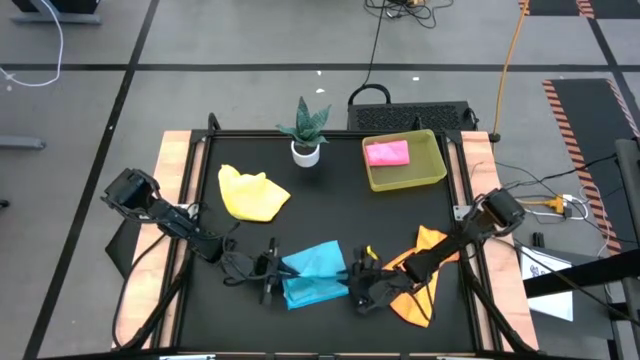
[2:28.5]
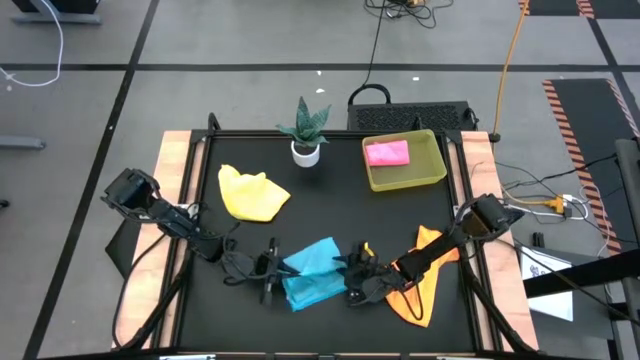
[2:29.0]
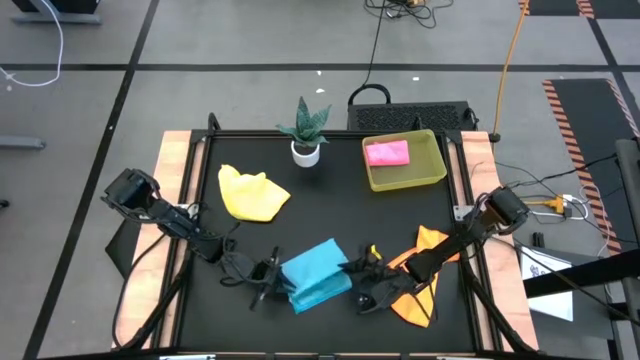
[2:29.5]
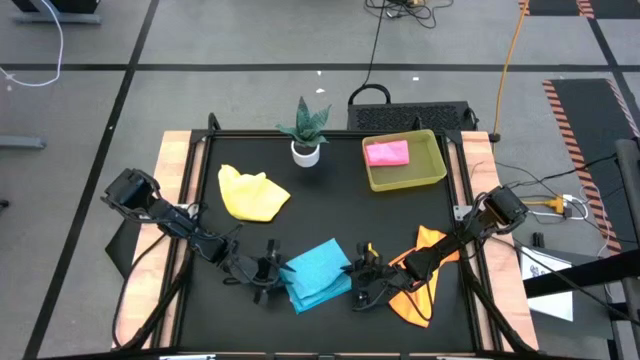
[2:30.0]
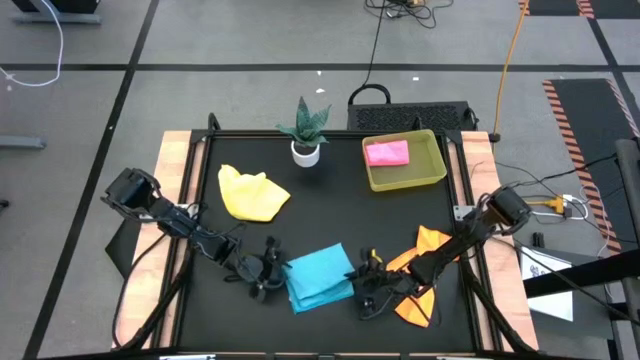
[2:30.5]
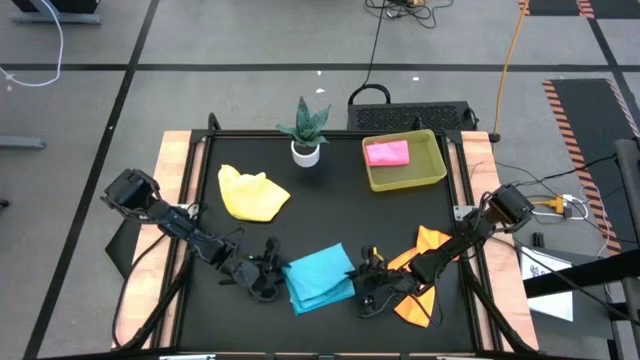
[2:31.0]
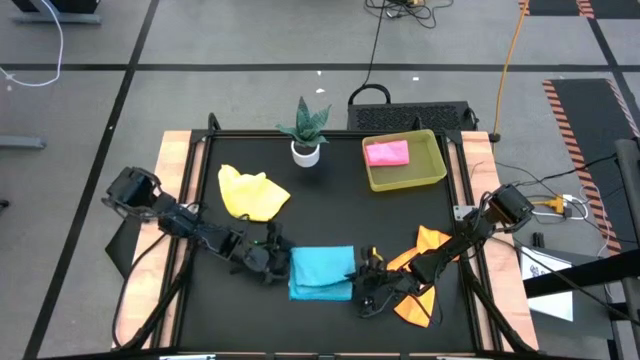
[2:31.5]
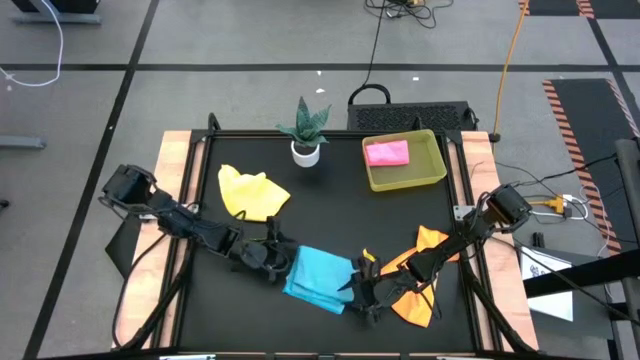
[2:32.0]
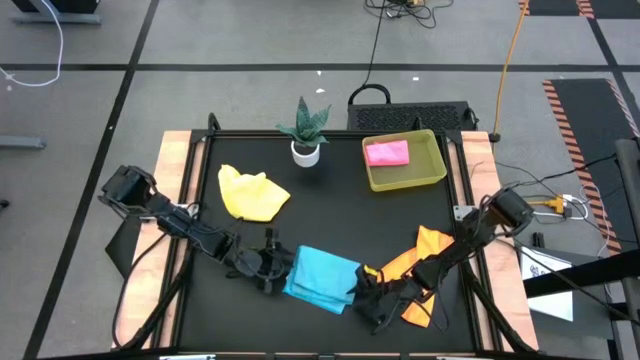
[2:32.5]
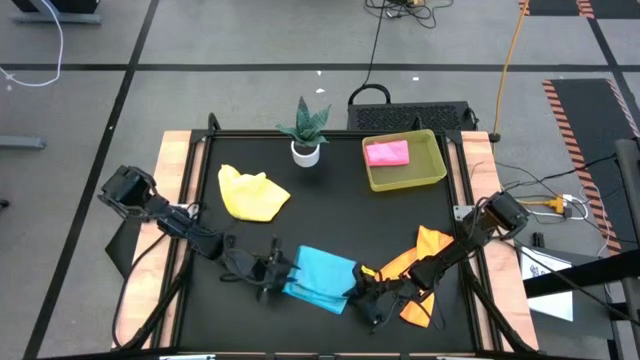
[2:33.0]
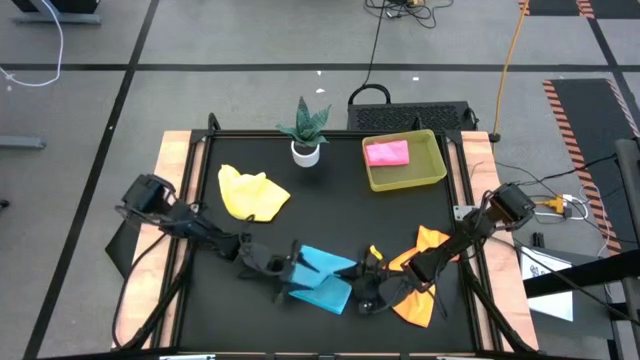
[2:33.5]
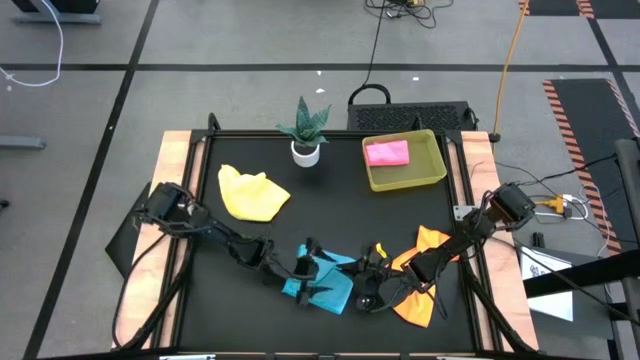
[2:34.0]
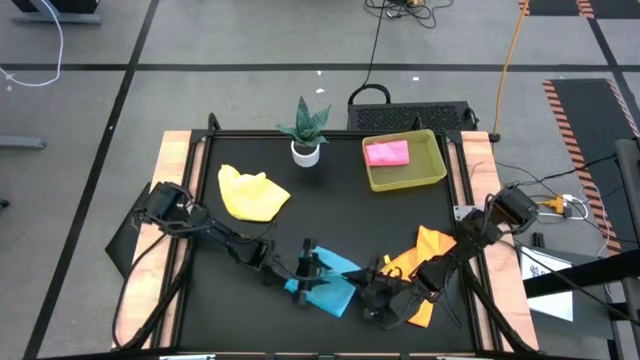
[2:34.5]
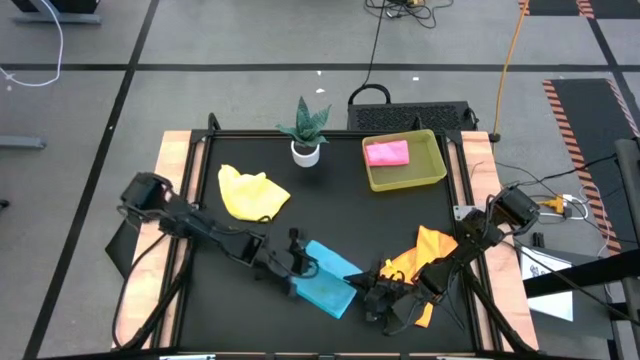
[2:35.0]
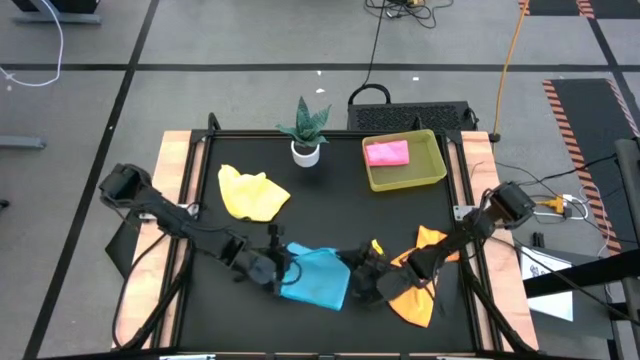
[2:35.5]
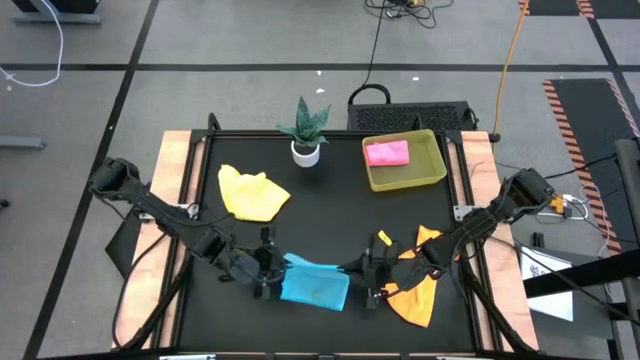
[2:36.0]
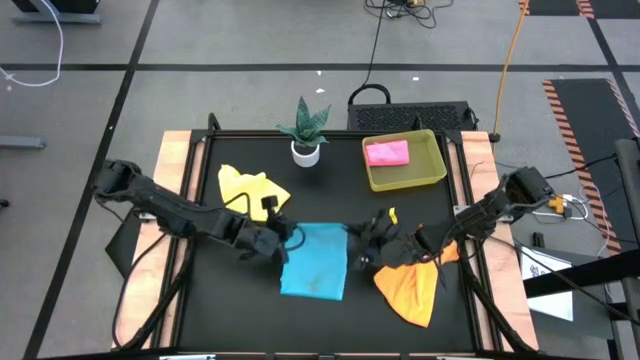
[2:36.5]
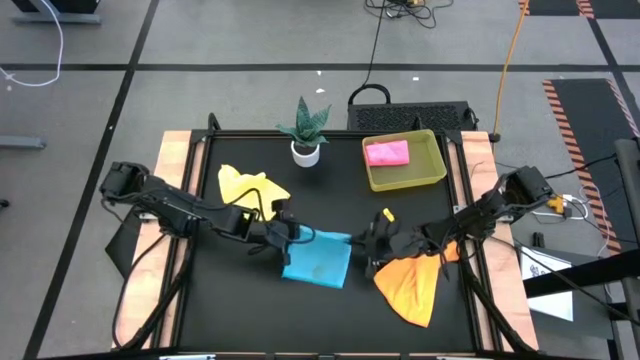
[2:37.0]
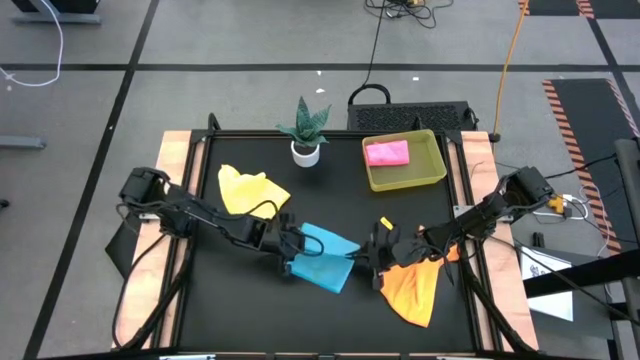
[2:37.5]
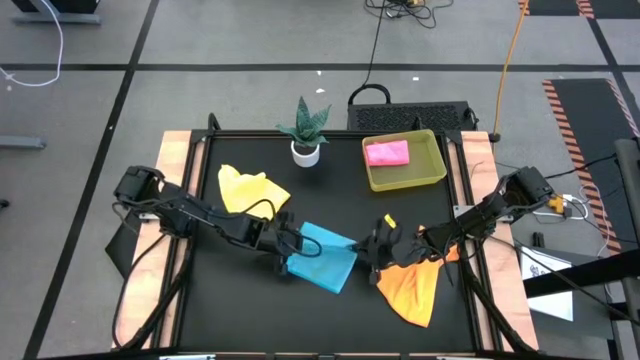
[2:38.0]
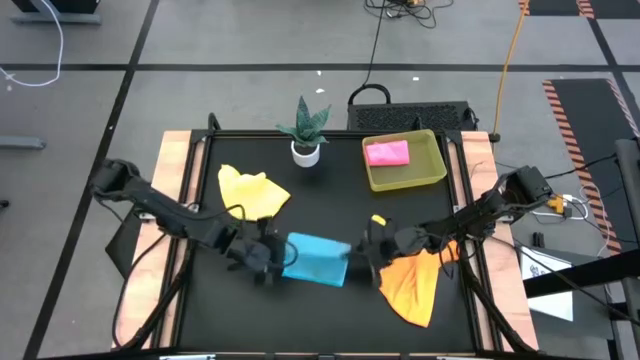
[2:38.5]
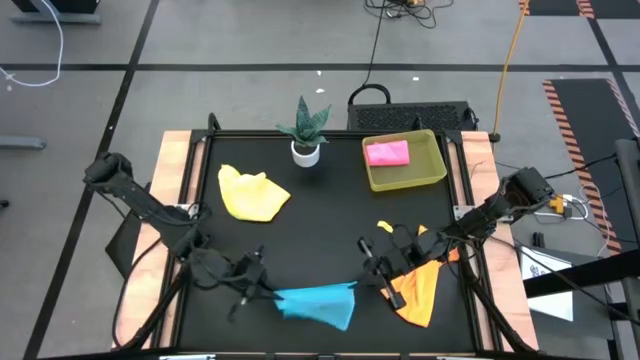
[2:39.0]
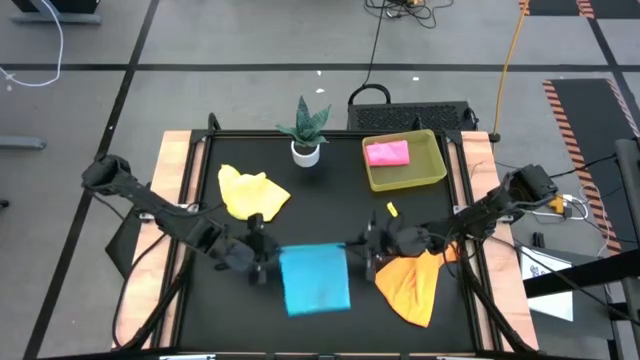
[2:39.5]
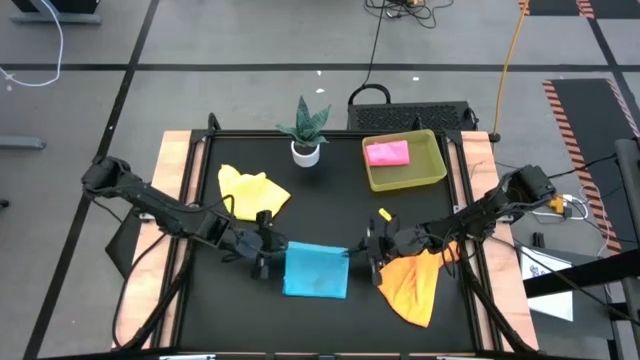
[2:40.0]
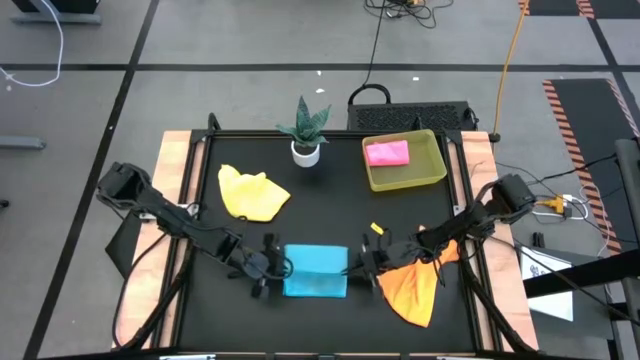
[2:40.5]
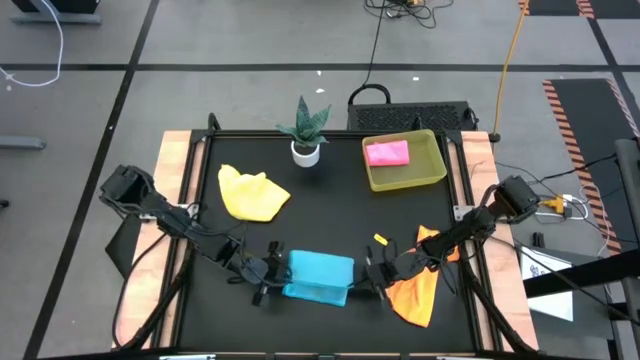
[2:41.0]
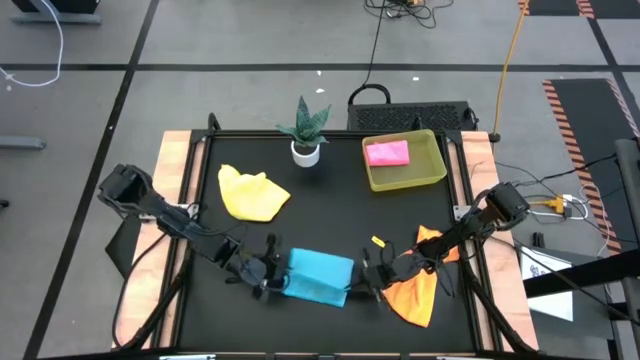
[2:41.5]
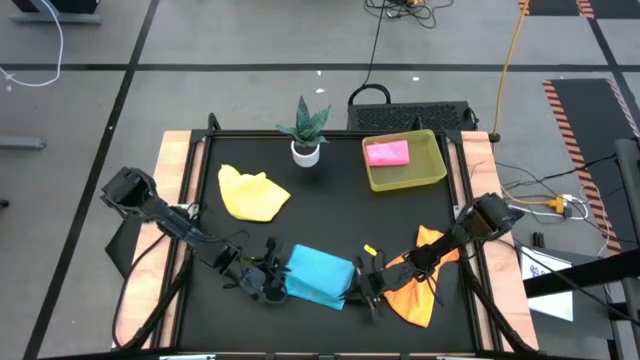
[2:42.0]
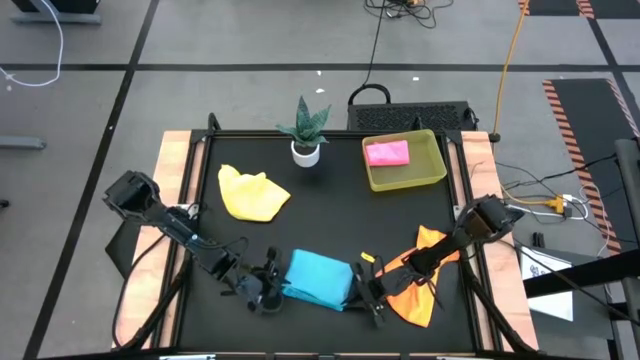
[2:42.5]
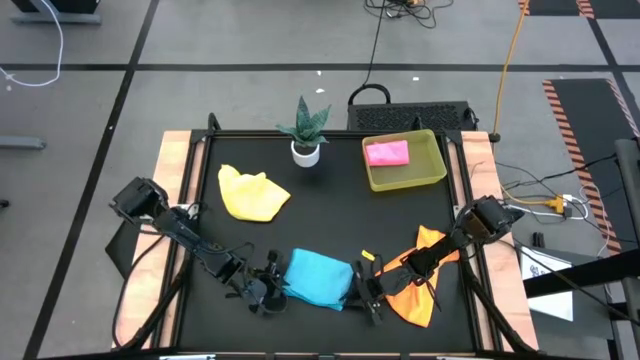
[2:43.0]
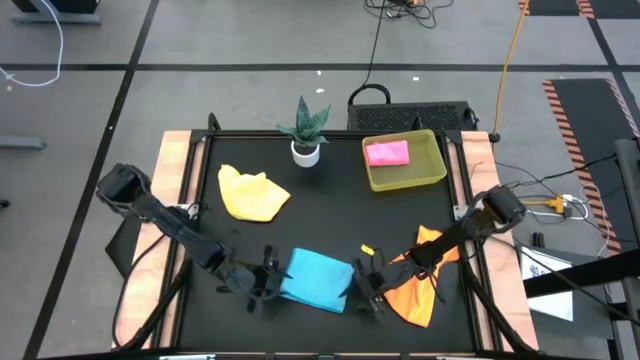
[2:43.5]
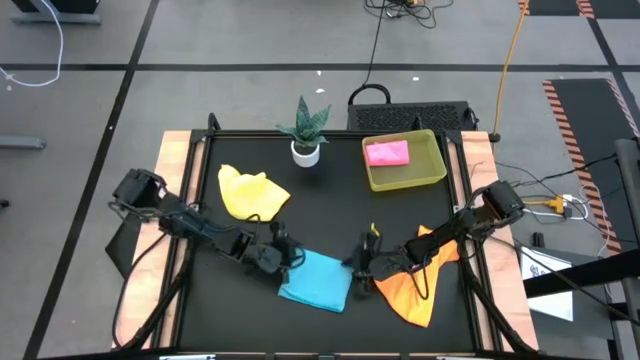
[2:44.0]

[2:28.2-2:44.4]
Task: Fold microfiber towels
Fold the blue microfiber cloth

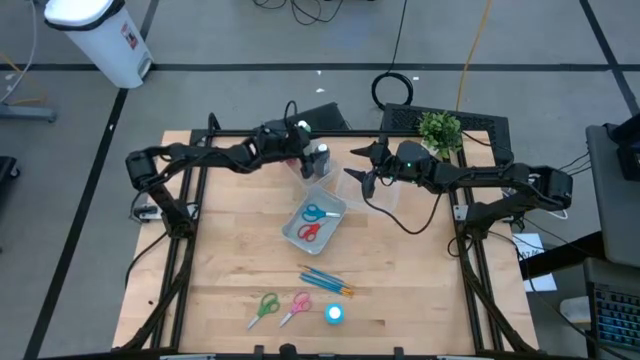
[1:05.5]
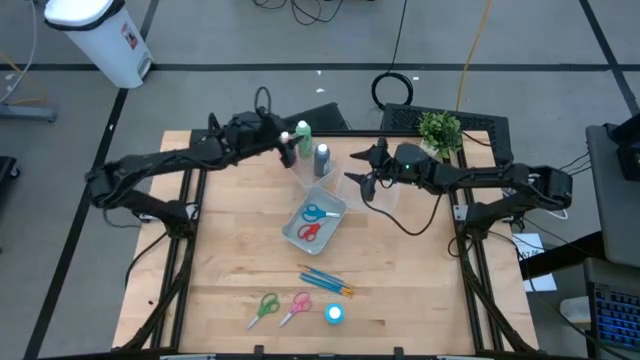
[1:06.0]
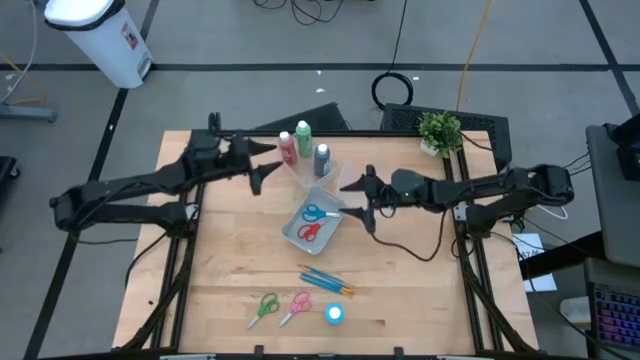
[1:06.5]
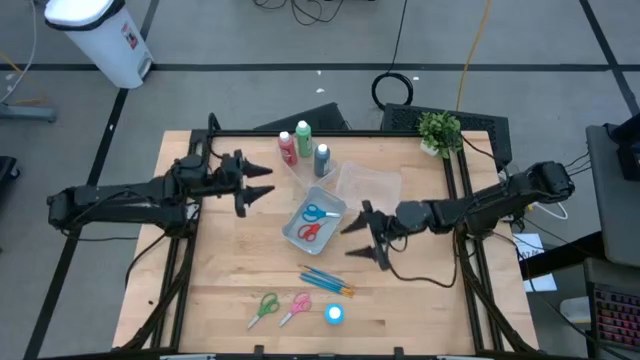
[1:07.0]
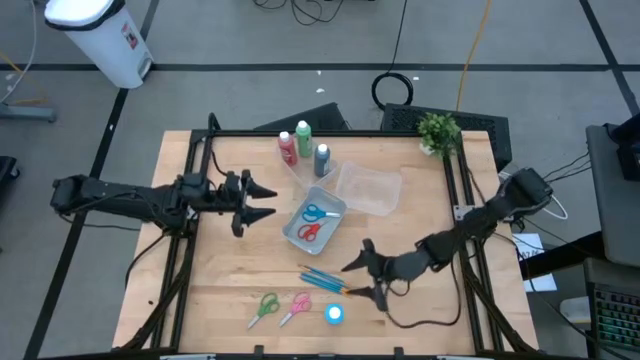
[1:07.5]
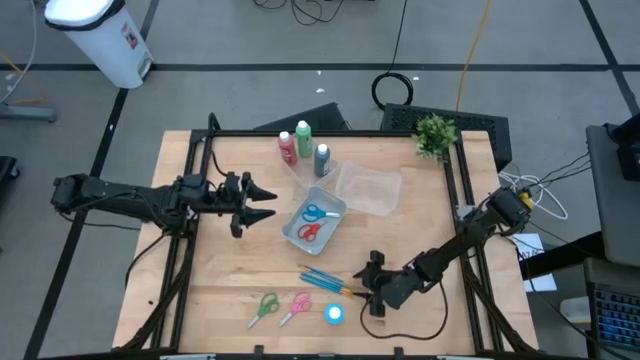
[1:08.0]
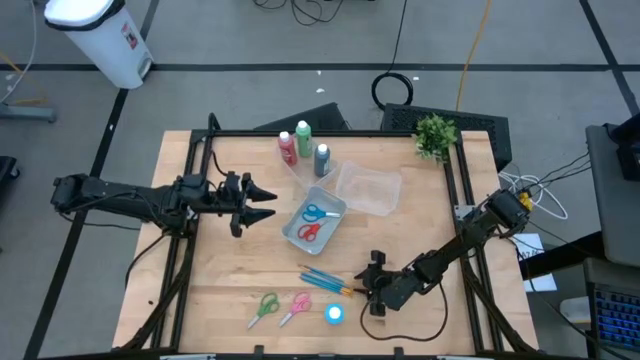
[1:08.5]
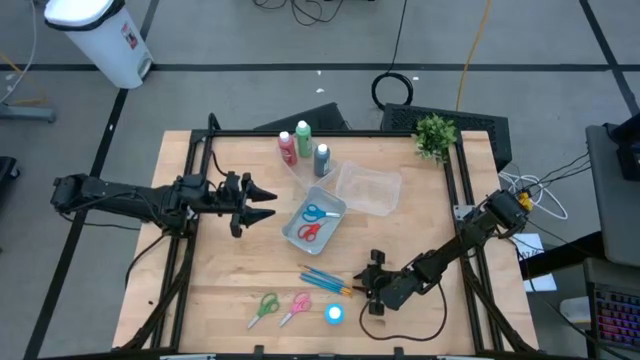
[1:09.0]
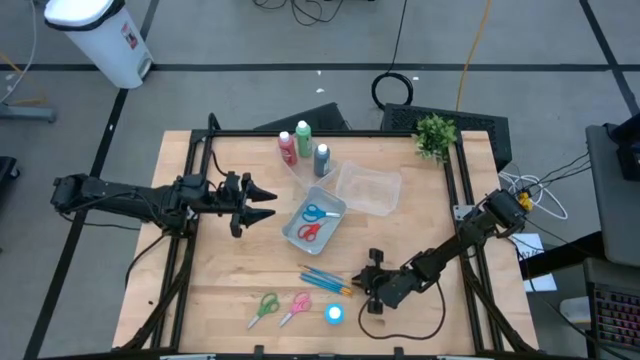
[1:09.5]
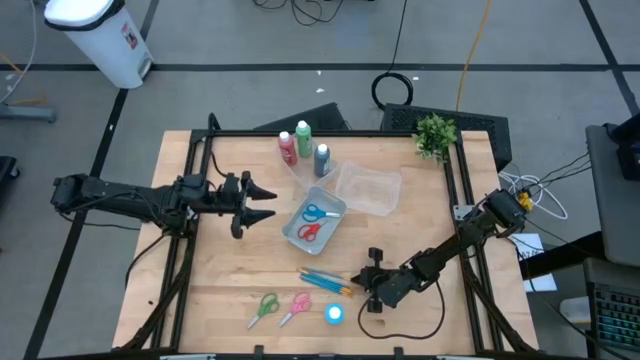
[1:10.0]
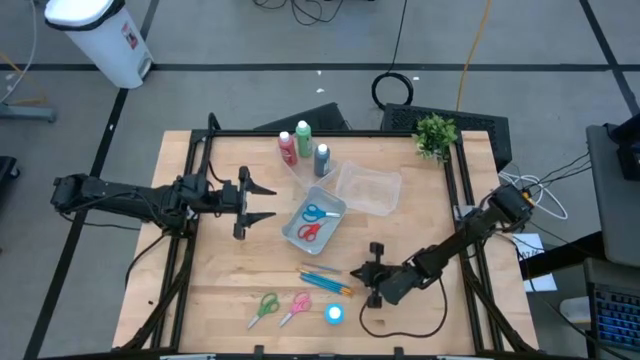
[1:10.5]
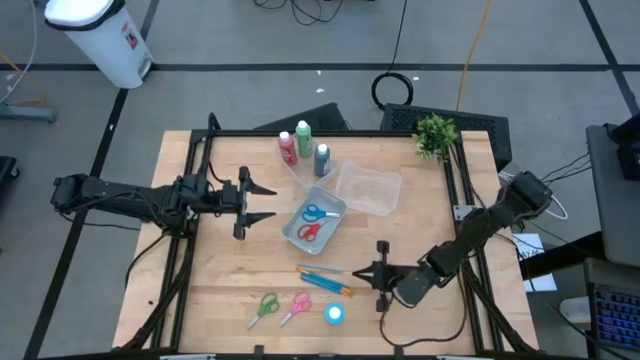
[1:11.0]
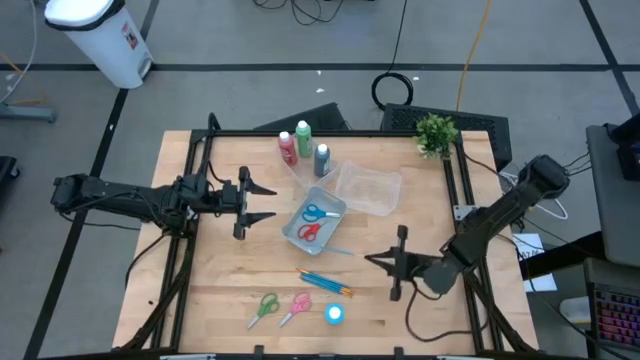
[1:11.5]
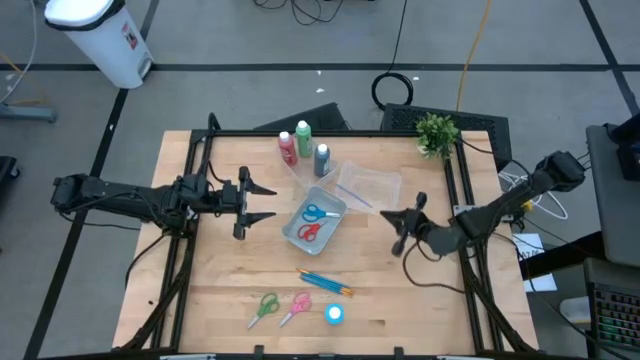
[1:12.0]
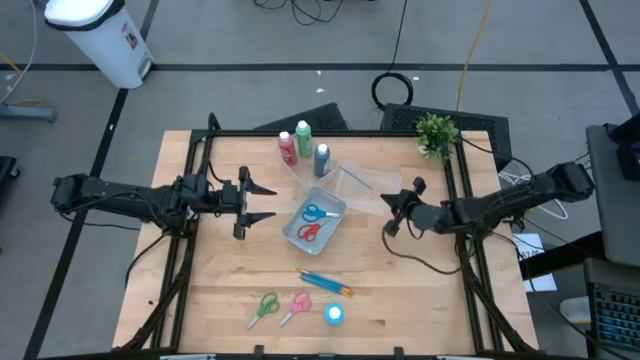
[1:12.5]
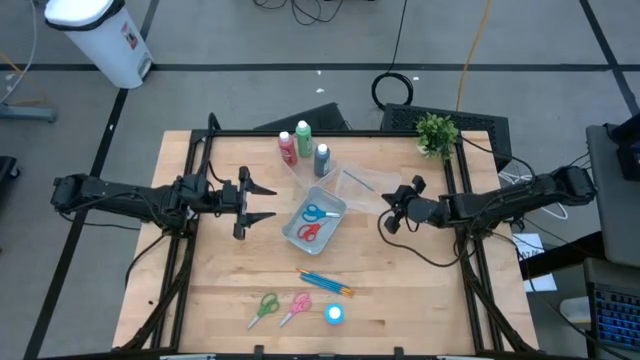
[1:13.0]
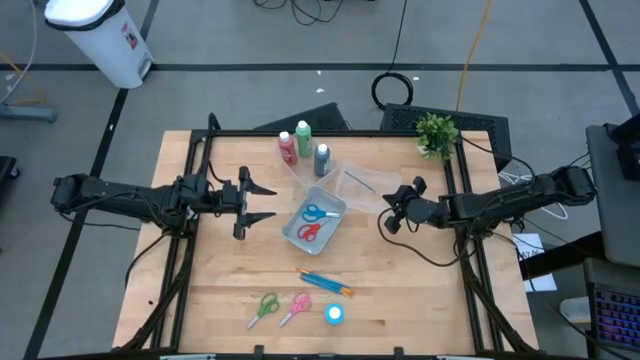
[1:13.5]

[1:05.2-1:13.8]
Task: Pick & Place Paint Supplies
Put the blue paintbrush into the right transparent bin
